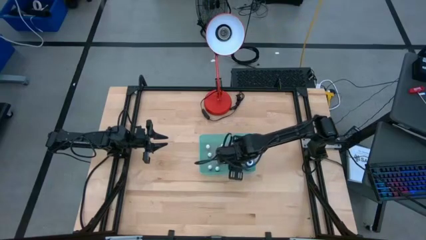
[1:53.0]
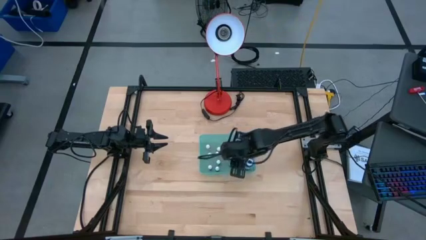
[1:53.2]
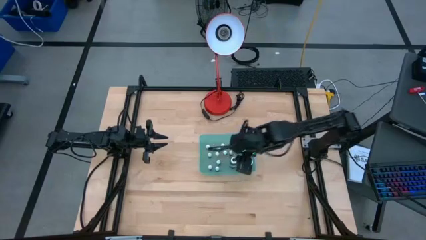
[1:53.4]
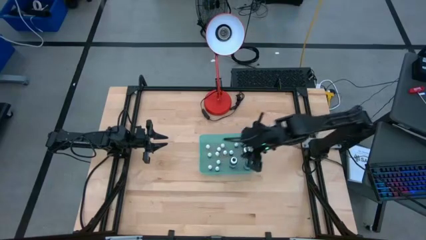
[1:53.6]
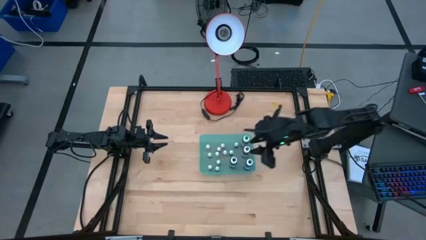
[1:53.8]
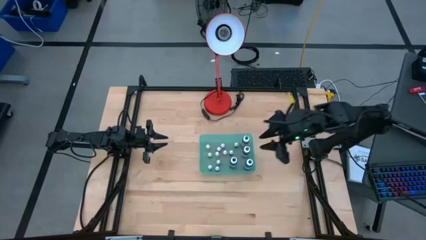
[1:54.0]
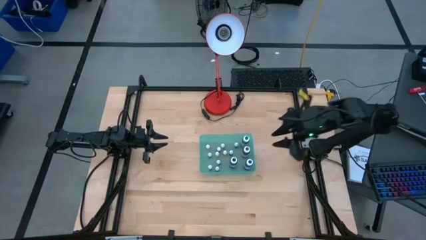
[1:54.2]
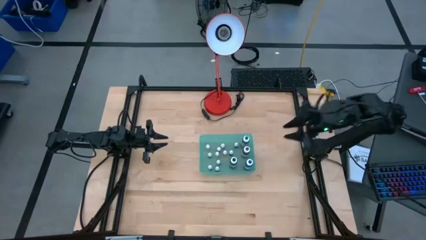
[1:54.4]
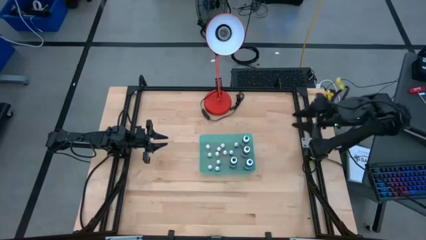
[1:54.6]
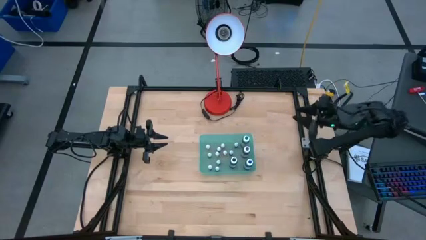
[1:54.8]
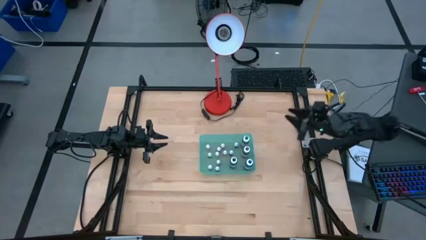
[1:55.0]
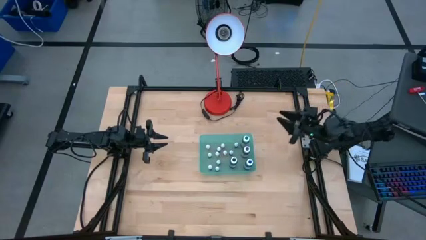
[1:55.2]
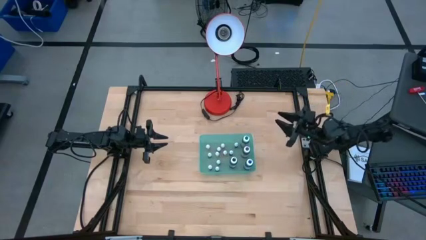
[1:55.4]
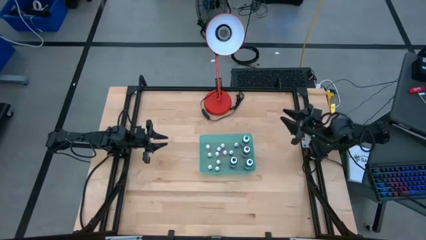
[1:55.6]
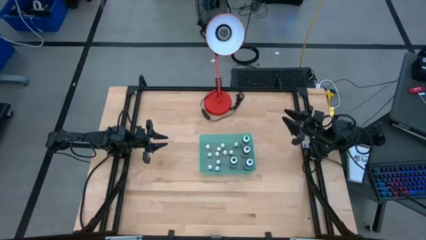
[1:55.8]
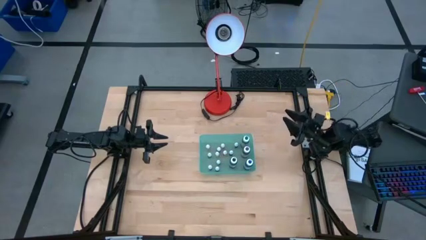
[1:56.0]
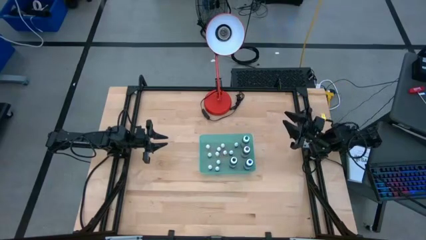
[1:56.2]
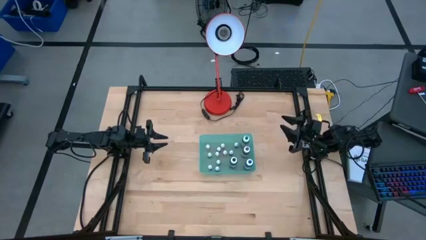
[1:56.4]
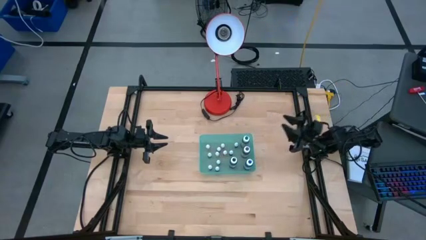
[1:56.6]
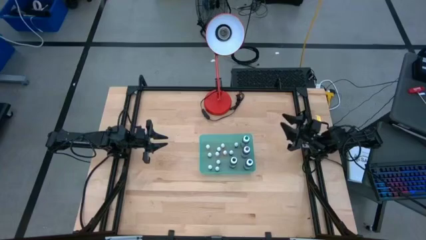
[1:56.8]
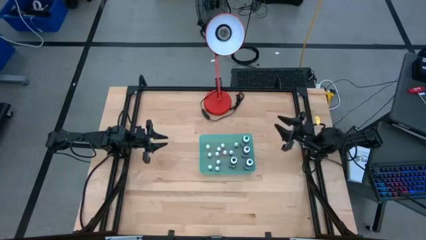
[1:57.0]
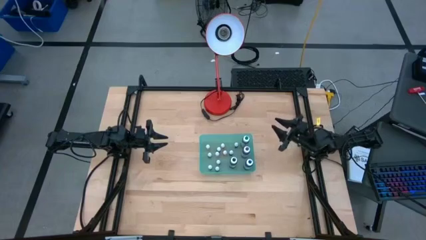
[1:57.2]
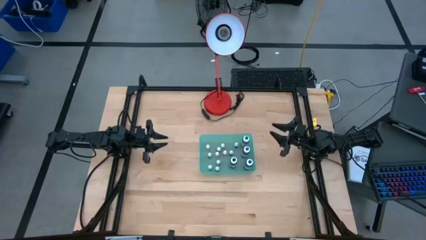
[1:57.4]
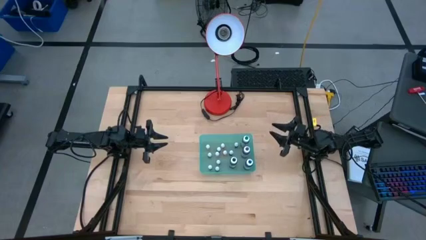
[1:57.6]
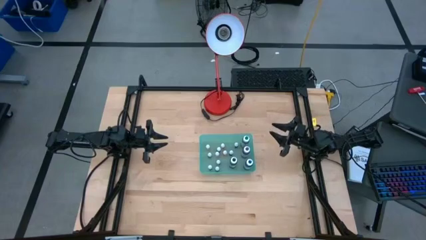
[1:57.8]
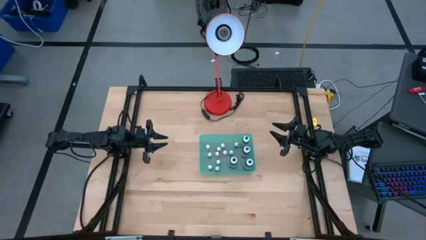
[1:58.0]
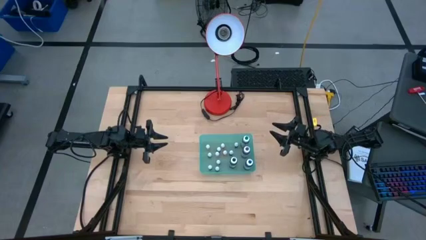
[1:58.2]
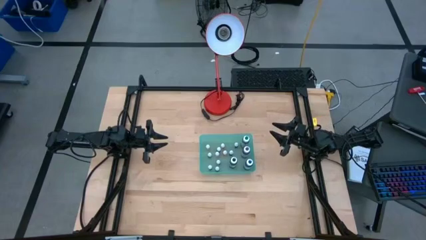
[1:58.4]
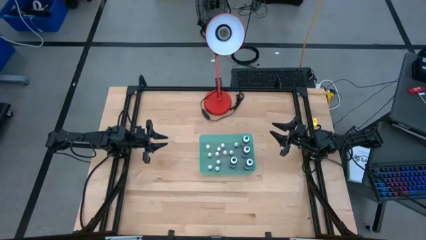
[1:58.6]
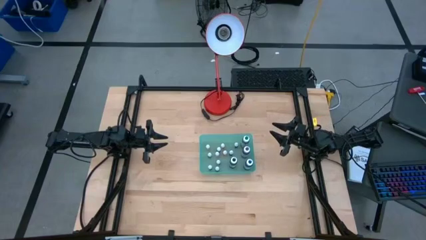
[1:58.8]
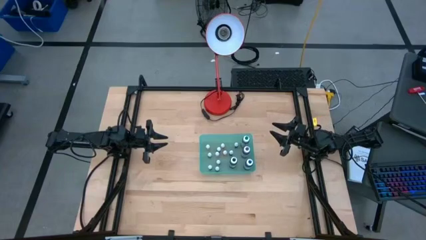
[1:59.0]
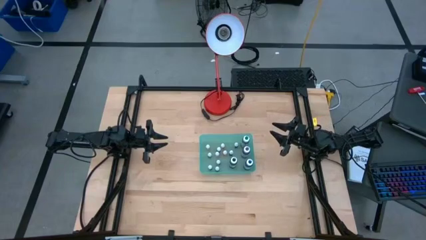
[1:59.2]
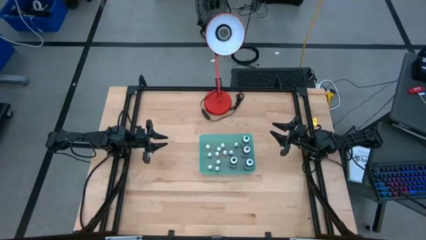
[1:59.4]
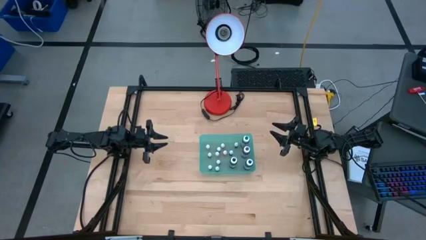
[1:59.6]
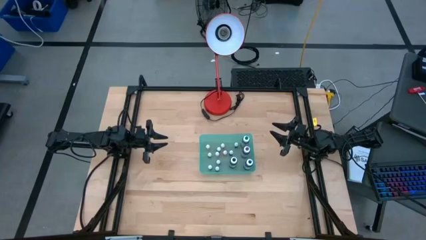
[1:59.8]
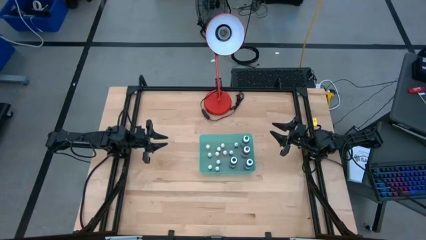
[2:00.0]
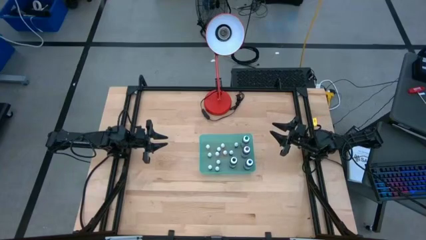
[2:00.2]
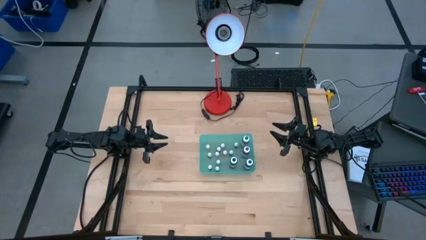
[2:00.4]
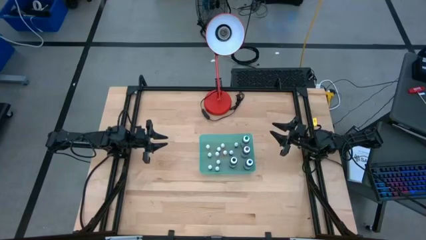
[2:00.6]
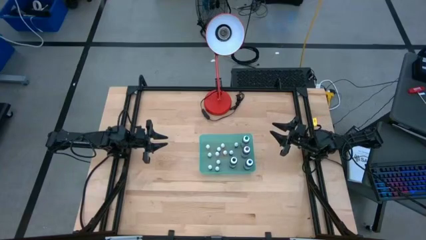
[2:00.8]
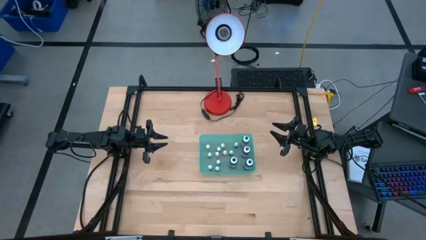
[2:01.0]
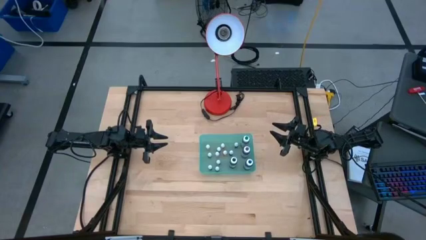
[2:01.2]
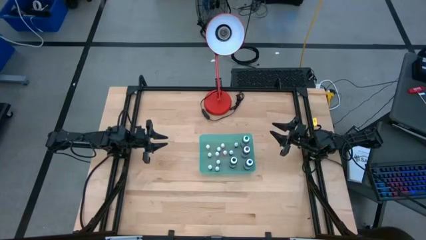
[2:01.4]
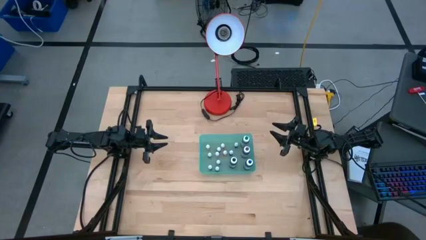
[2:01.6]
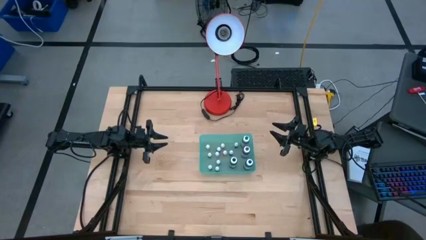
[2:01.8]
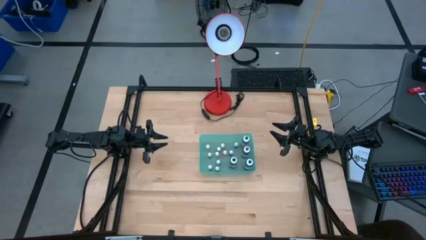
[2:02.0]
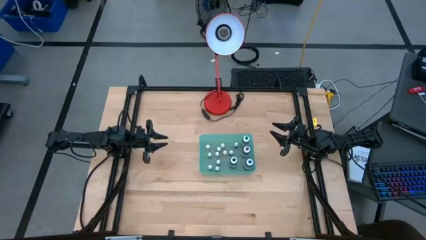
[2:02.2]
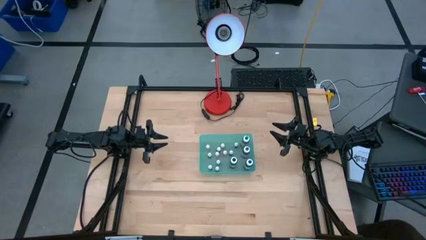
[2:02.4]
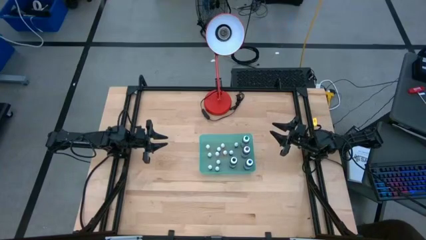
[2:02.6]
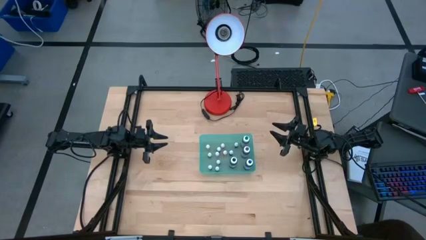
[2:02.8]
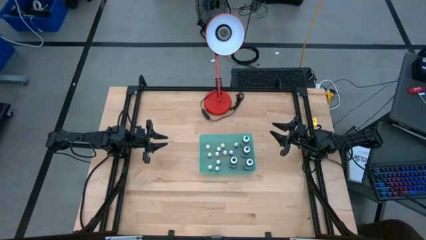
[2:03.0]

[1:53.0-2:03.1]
Task: Pick & Place food coloring
Return to Home Position

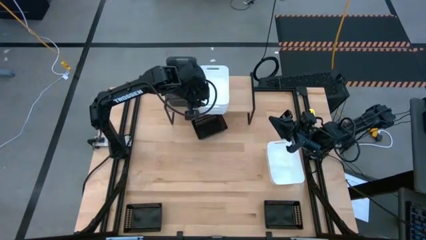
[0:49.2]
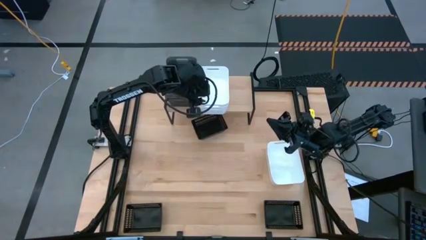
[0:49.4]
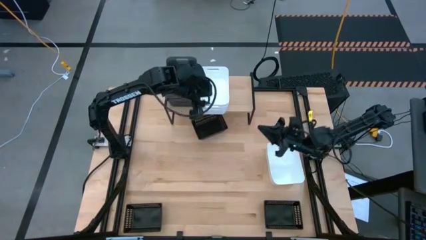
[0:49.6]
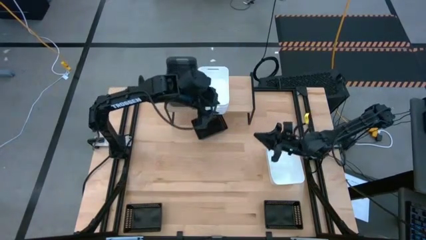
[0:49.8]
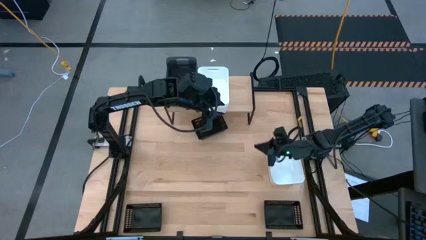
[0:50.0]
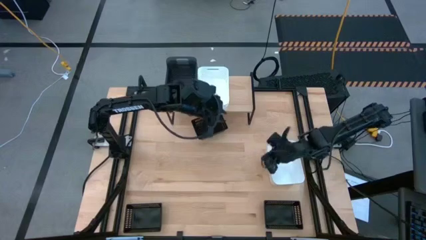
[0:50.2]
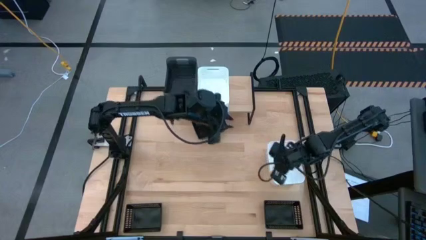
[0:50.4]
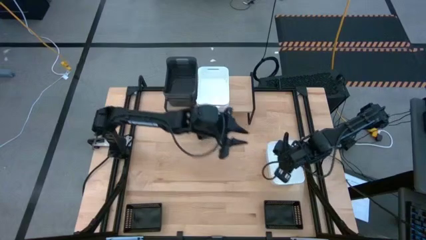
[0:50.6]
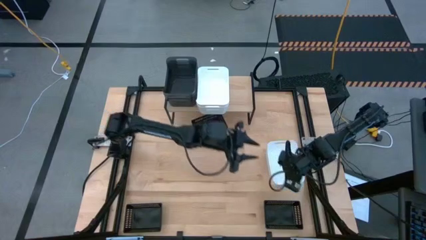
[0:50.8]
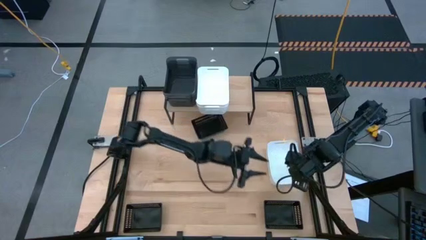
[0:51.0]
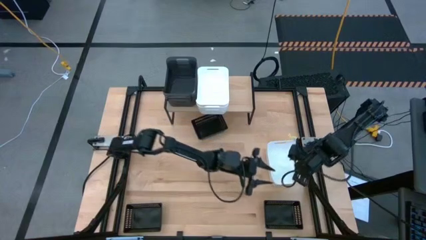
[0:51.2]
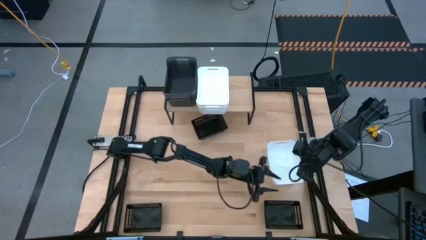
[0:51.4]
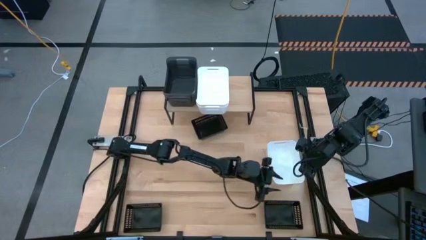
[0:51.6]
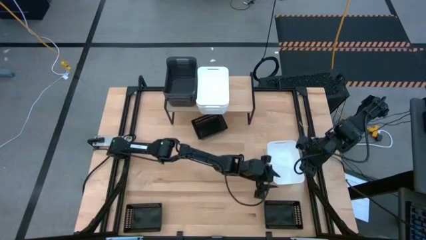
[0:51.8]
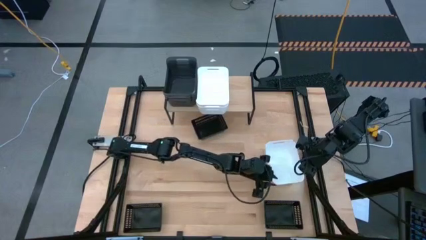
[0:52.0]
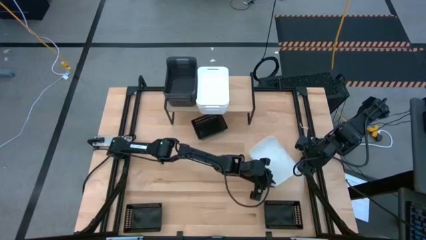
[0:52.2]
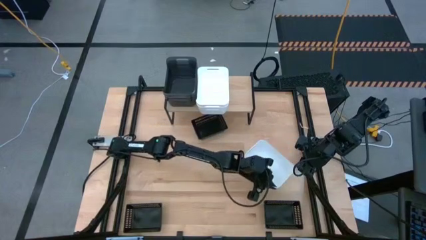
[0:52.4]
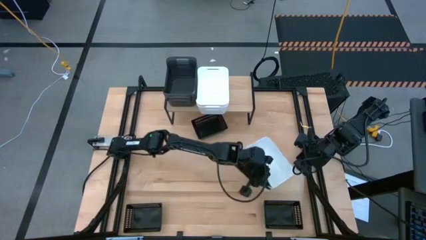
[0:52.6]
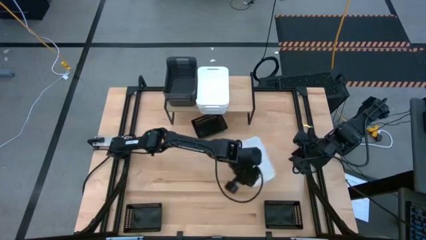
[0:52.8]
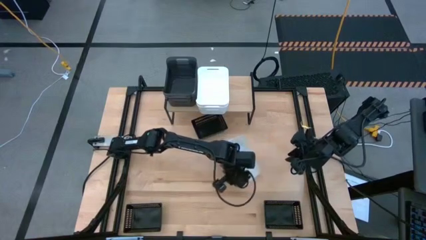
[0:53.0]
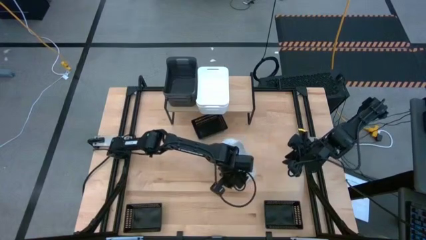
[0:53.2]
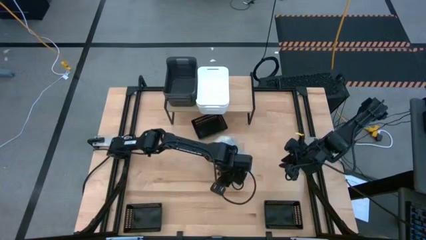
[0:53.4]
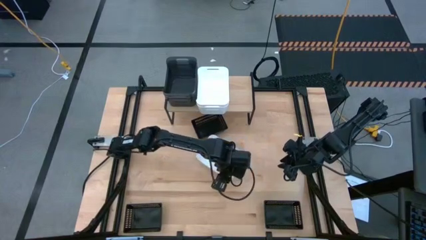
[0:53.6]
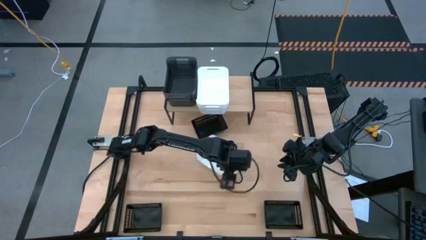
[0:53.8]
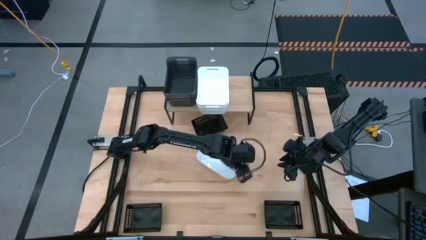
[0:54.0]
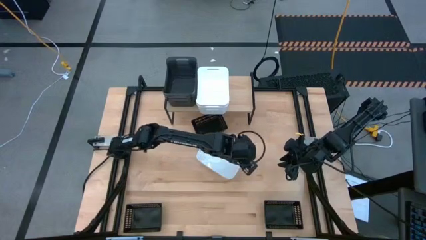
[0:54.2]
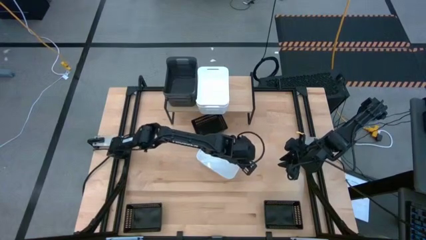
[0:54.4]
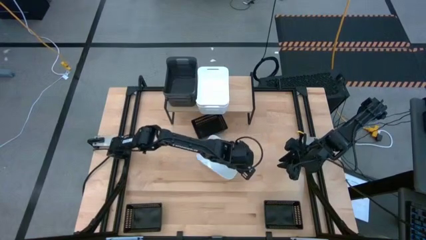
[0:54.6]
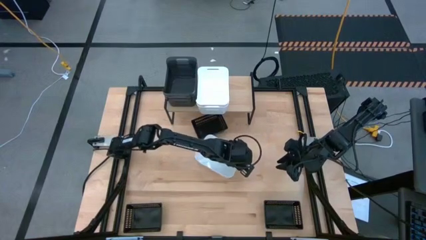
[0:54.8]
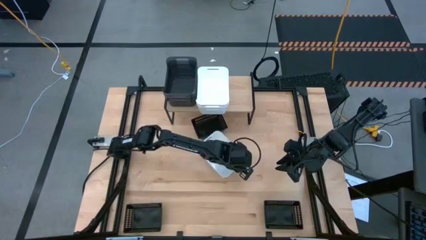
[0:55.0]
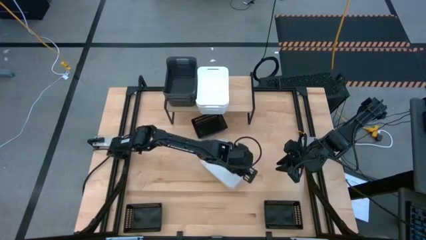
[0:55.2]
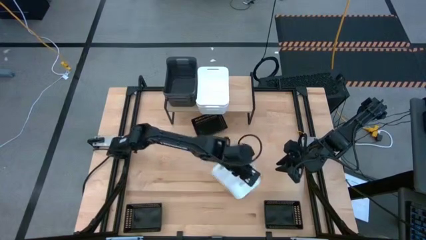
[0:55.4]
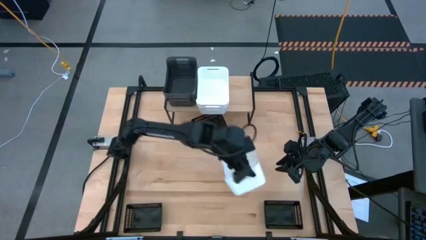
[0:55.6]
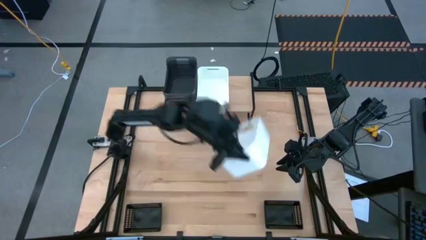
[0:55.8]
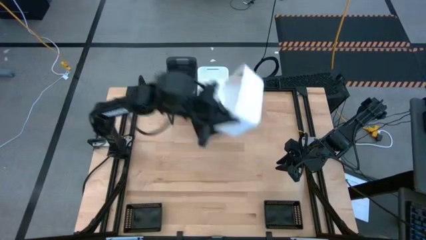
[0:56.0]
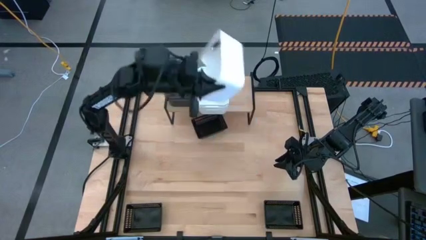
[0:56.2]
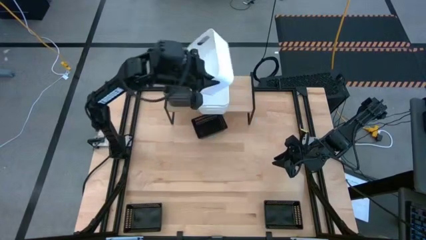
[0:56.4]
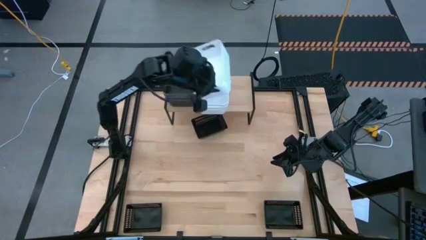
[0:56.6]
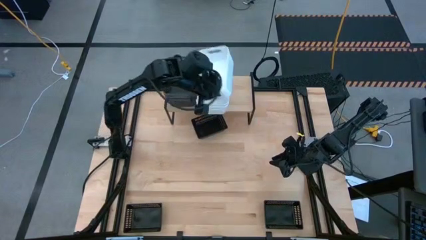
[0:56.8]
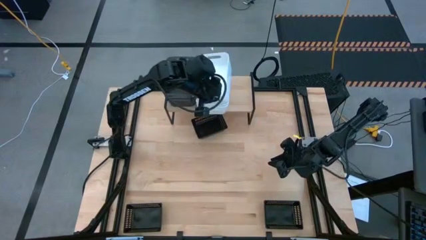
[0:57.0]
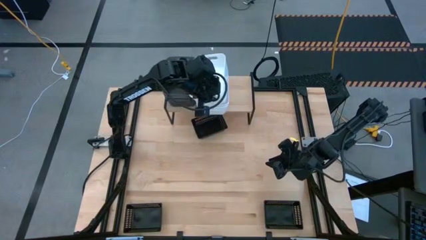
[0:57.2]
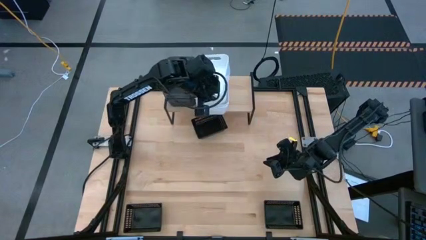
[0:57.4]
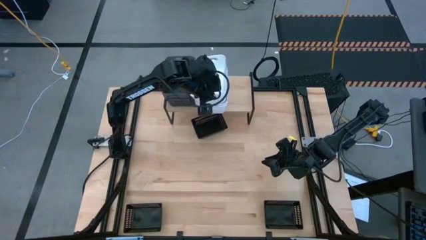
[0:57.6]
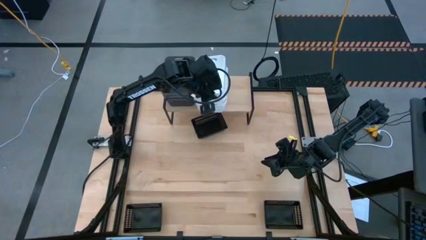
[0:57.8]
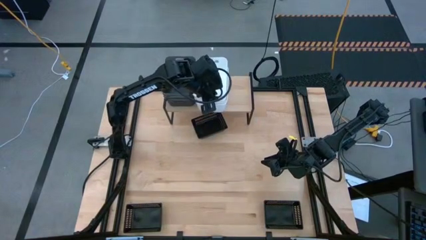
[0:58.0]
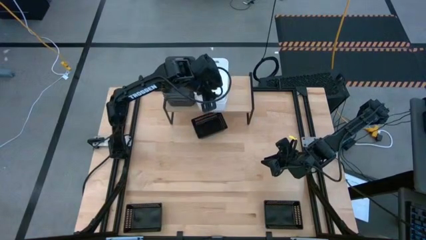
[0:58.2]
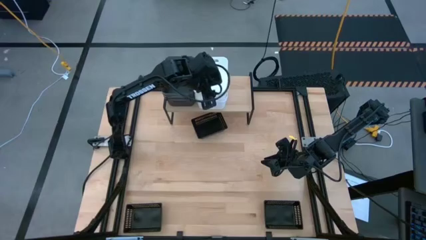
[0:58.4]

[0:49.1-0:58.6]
Task: Stack baskets on shelf by color
Stack the white bin on top of the white bin on the shelf
